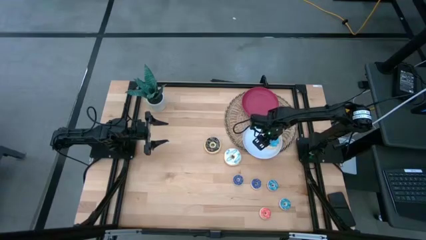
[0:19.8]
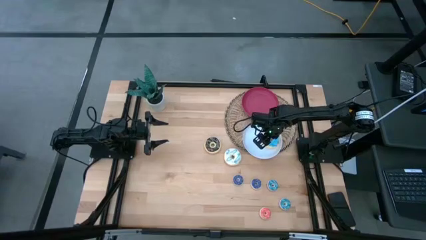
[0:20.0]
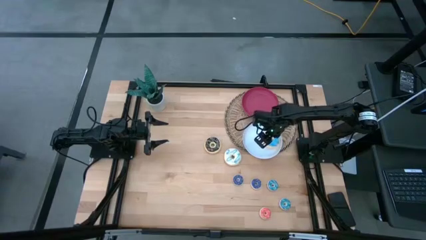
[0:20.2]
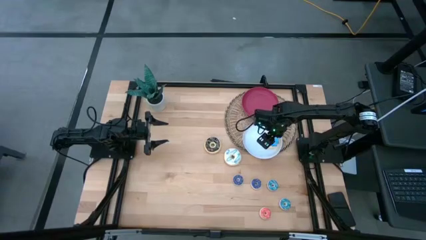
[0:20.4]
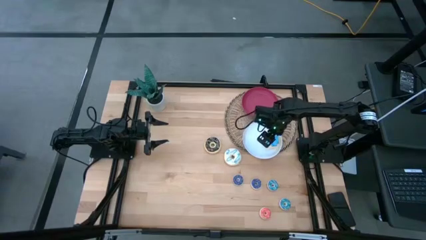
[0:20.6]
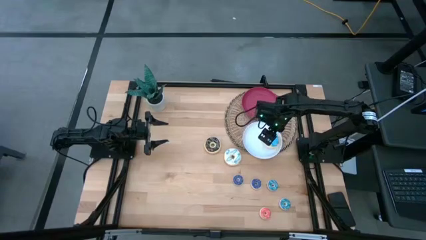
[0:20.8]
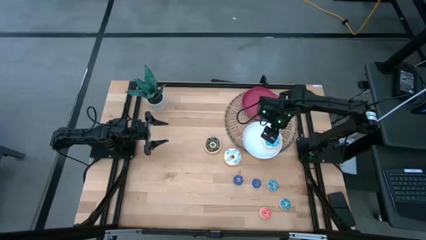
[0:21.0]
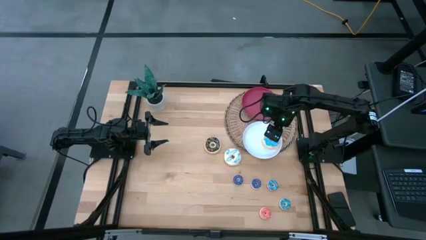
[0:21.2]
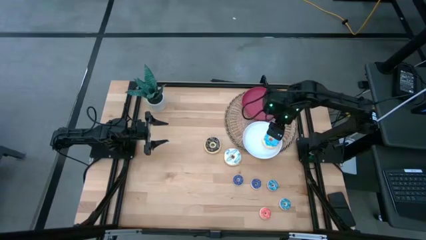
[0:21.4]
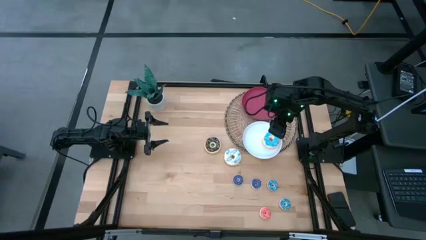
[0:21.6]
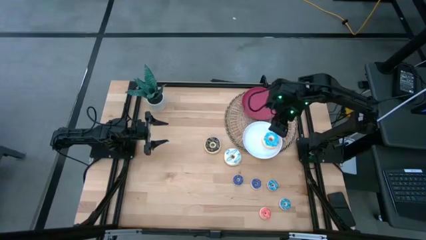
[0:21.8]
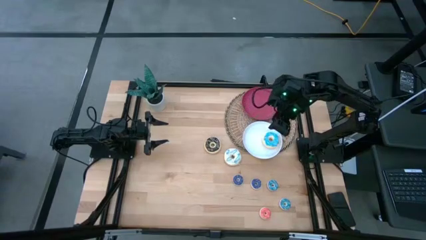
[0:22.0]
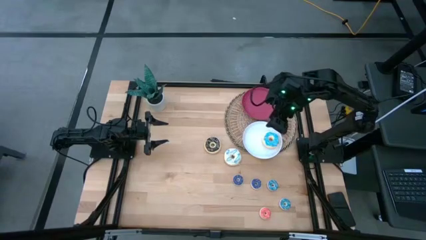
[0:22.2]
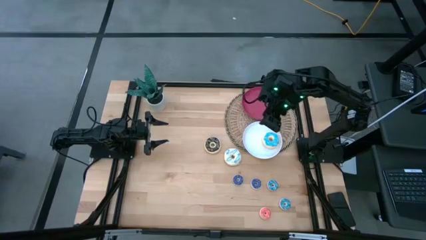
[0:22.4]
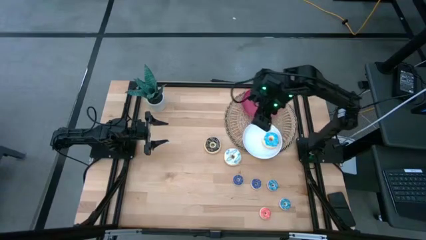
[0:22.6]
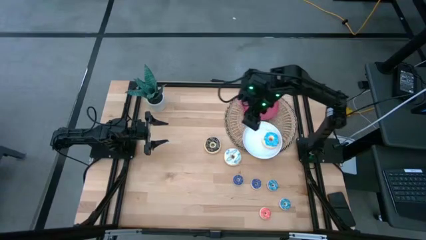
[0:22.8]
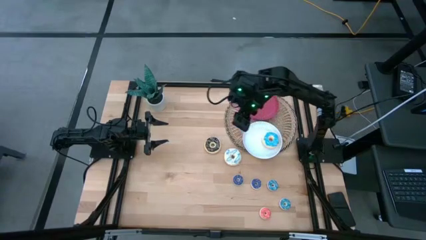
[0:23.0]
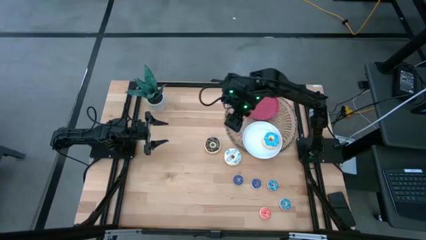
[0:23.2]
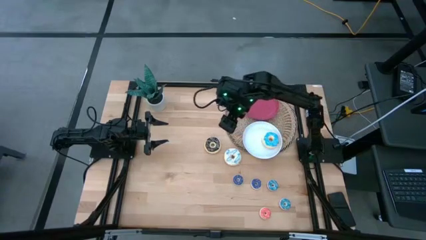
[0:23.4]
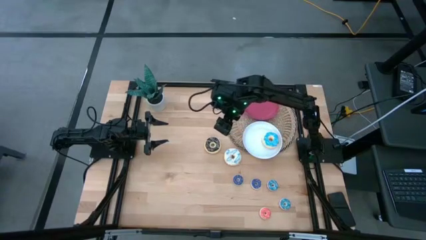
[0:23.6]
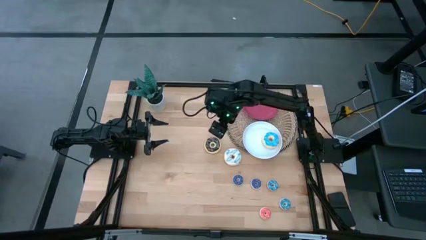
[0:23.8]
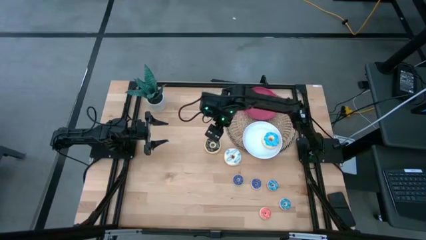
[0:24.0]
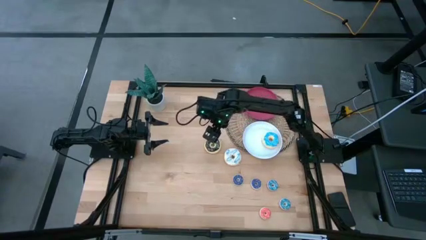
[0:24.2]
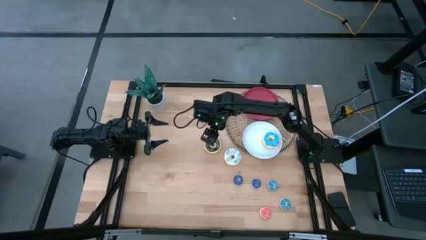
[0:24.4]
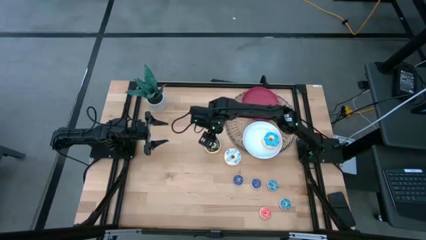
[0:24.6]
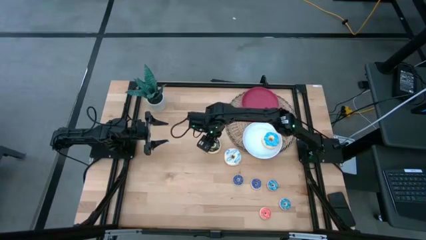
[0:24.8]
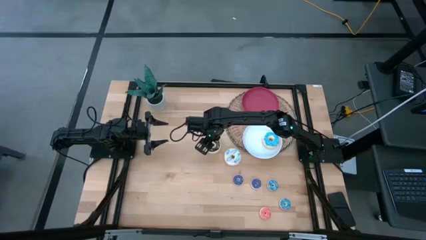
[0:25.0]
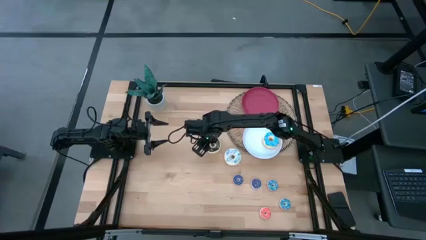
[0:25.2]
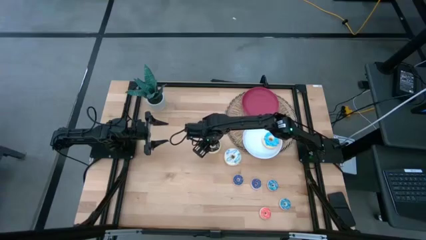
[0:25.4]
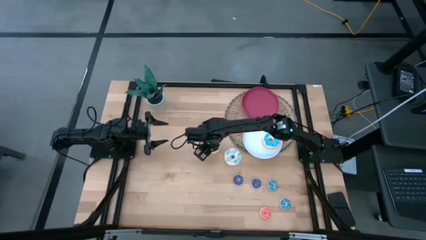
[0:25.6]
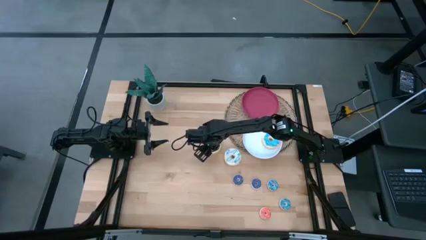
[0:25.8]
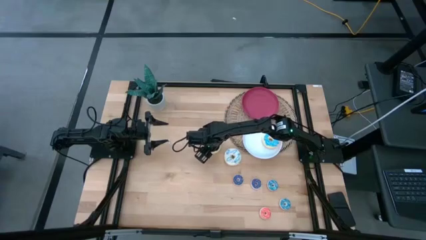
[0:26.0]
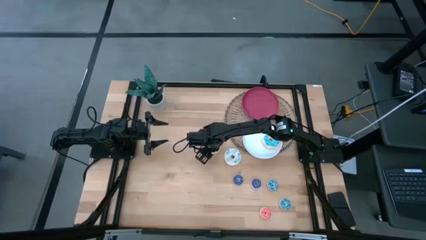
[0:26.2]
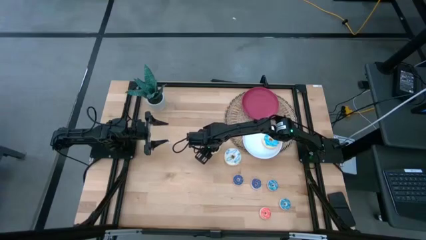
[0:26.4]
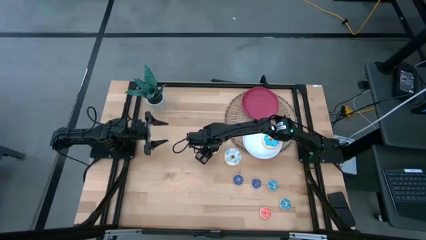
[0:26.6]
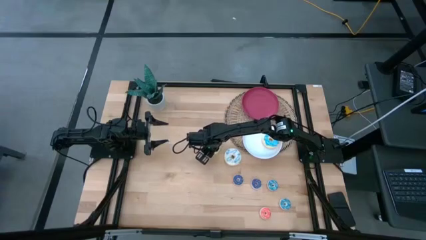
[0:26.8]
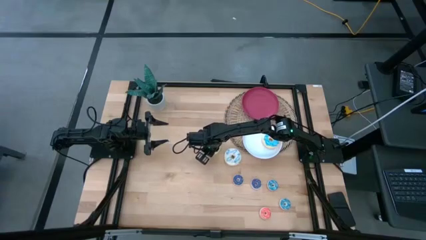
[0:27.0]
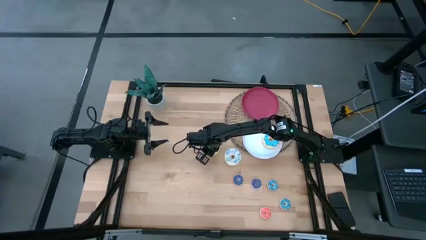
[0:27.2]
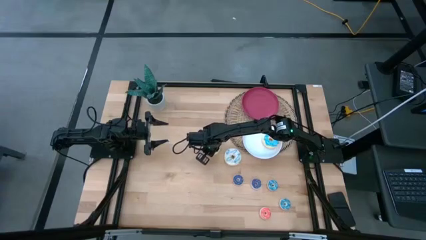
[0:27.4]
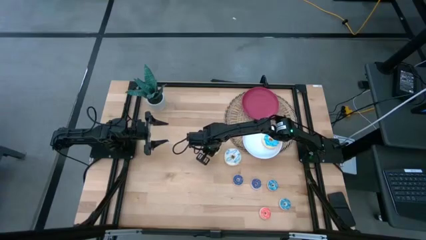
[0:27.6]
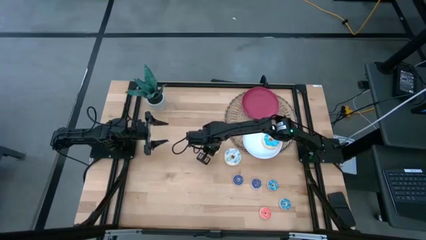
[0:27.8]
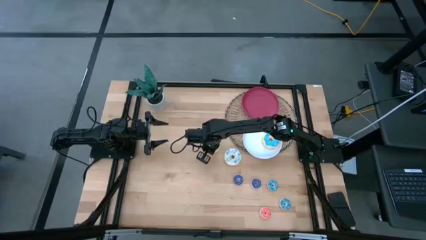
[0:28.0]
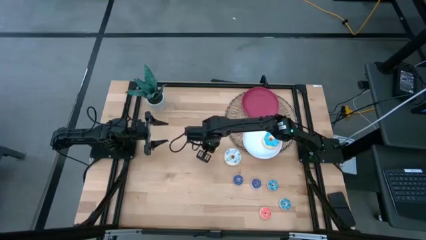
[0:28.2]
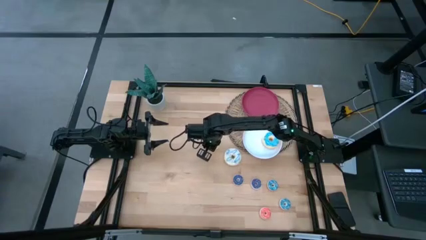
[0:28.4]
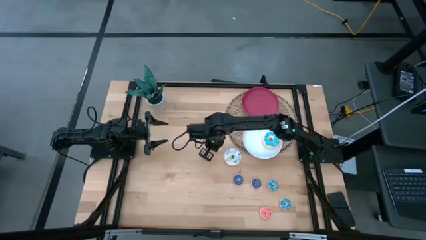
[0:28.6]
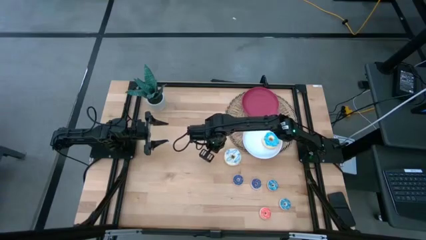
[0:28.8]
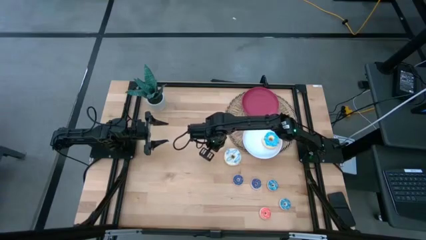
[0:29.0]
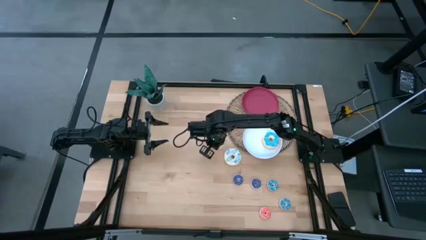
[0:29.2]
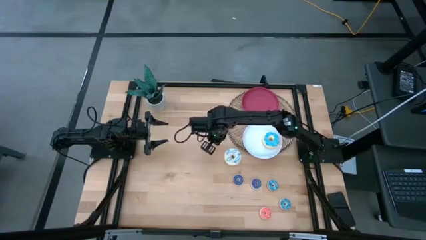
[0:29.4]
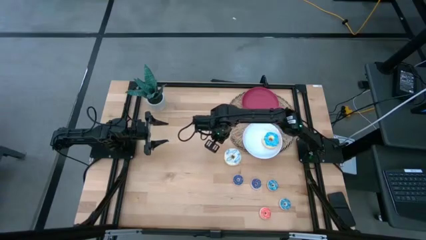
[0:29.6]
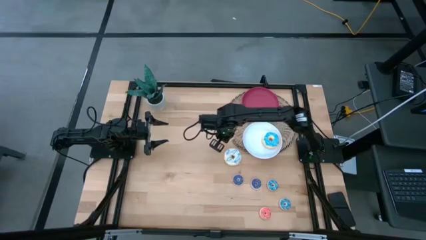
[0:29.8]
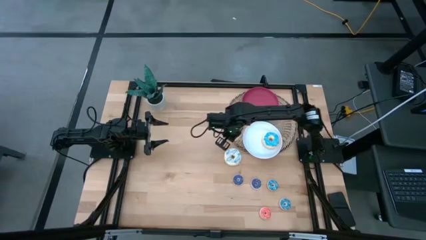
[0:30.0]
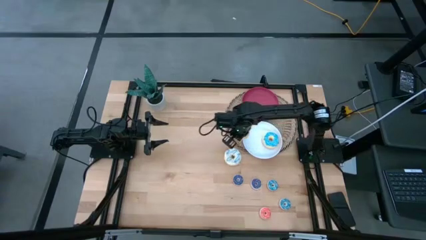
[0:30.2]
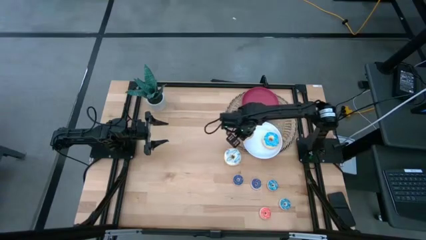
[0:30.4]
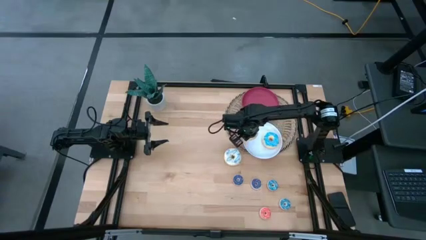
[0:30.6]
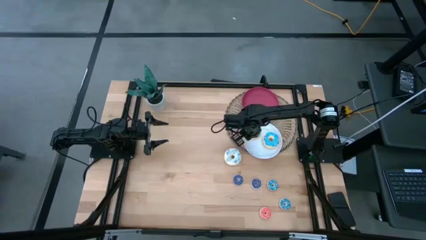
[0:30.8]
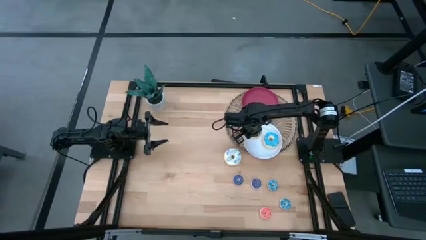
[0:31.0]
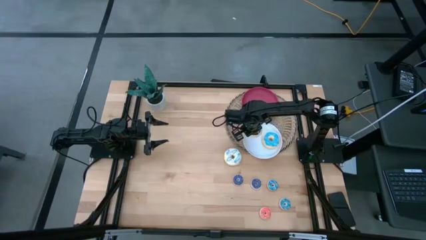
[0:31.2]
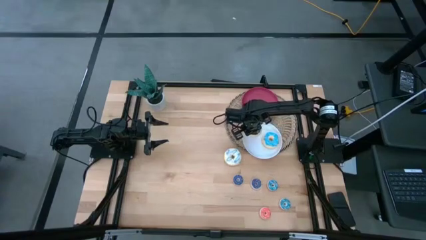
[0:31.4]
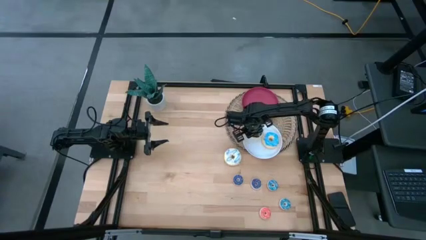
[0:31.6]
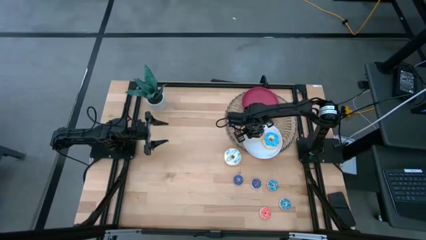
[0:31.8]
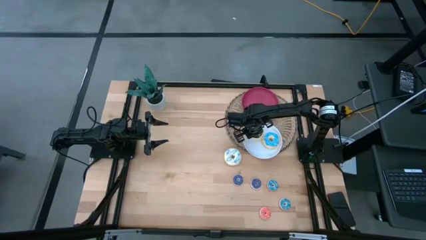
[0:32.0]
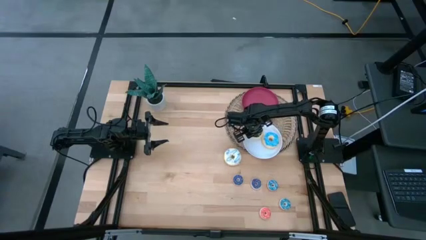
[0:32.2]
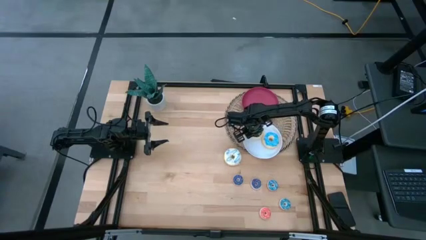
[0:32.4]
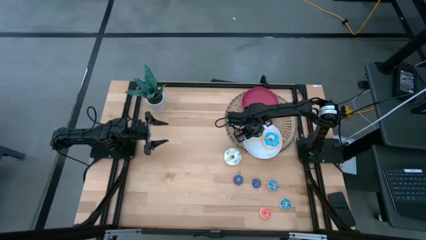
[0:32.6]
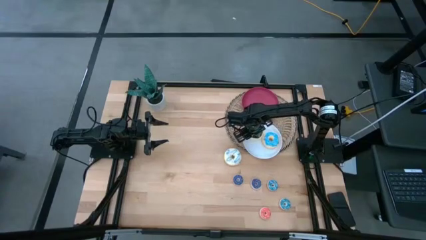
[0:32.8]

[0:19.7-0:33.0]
Task: Pick & Place donuts
Put the big black donut on the white plate
